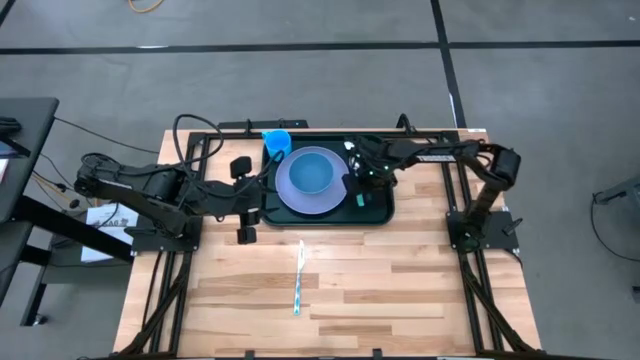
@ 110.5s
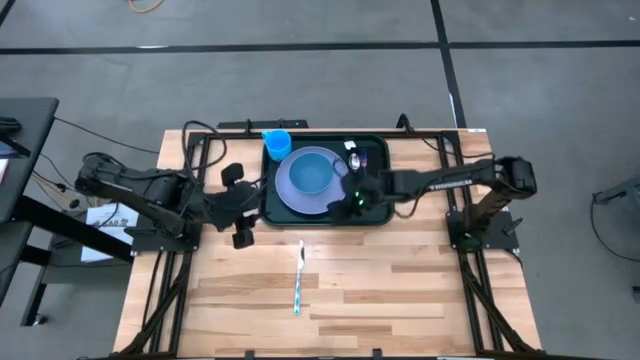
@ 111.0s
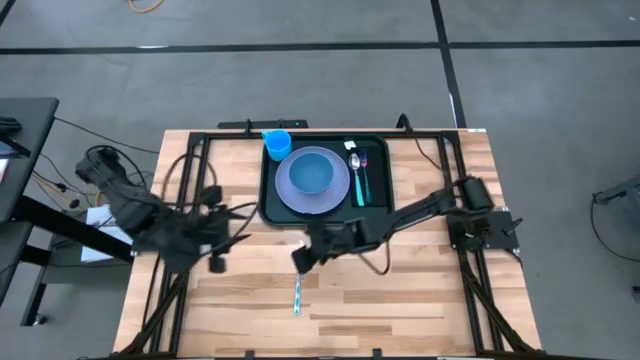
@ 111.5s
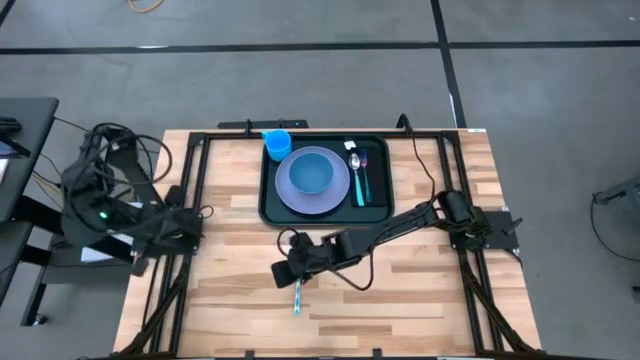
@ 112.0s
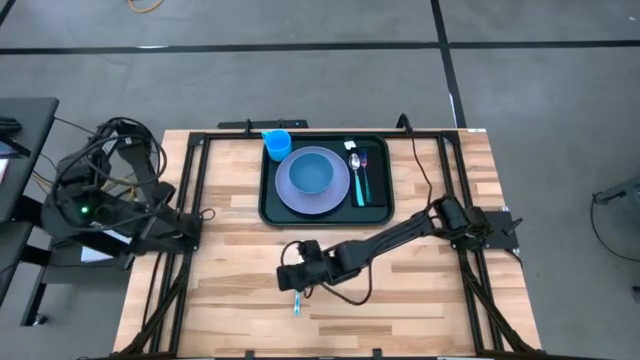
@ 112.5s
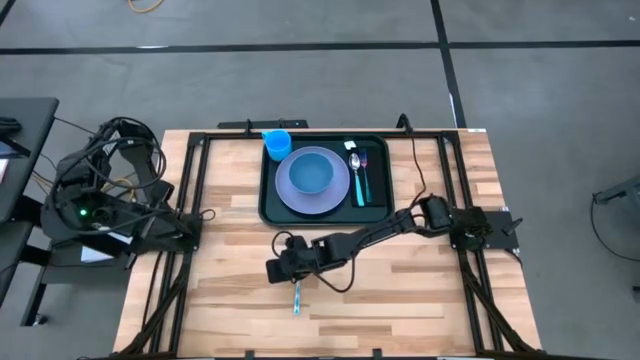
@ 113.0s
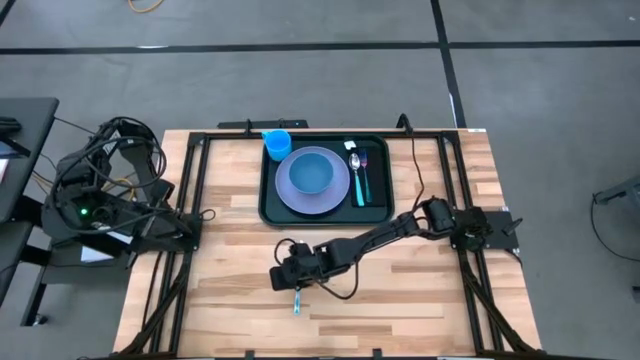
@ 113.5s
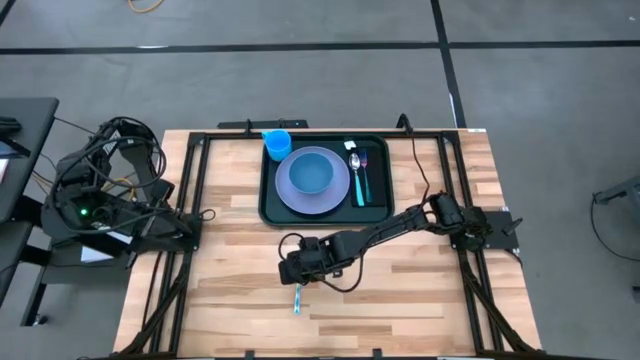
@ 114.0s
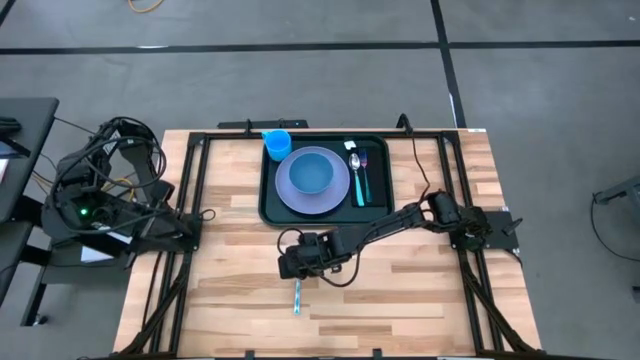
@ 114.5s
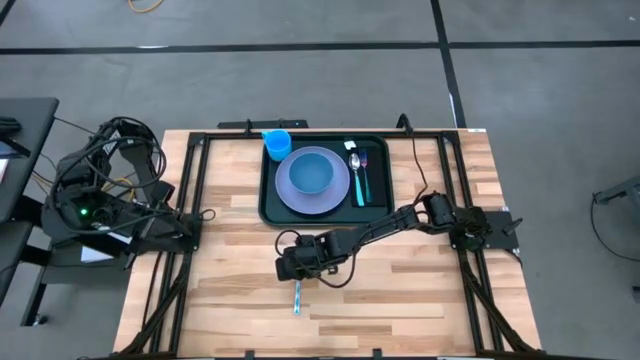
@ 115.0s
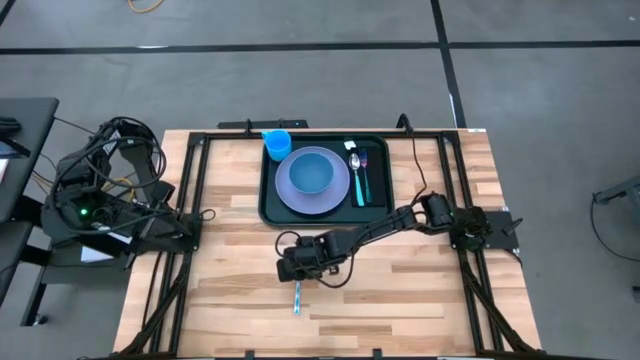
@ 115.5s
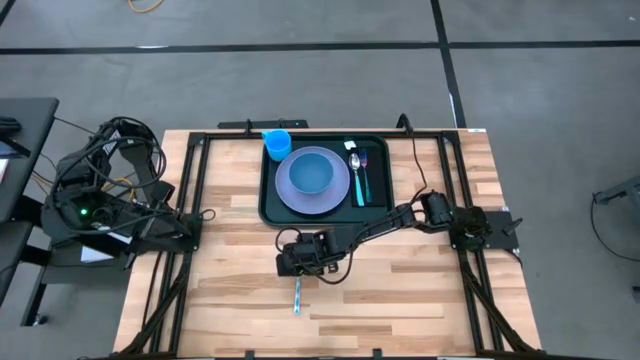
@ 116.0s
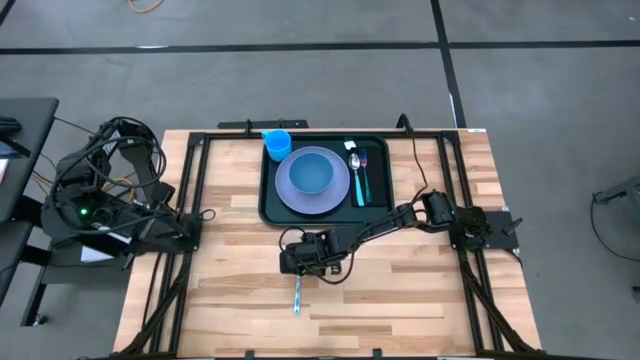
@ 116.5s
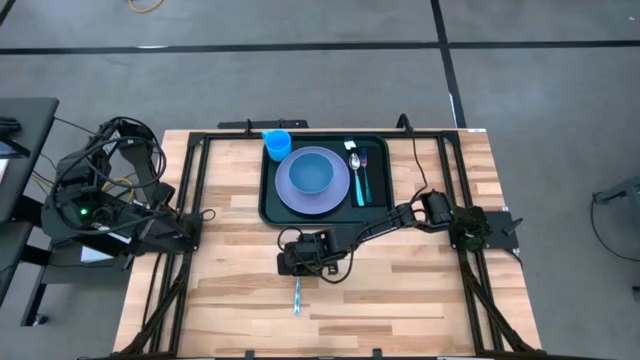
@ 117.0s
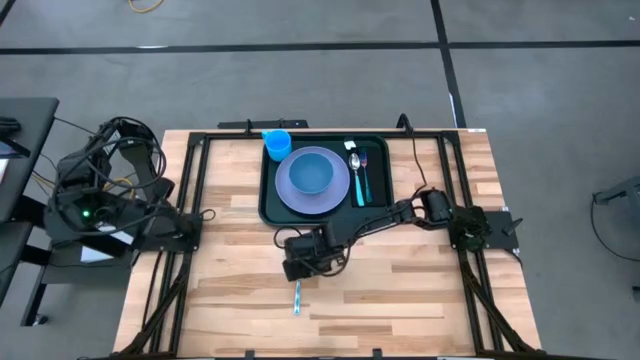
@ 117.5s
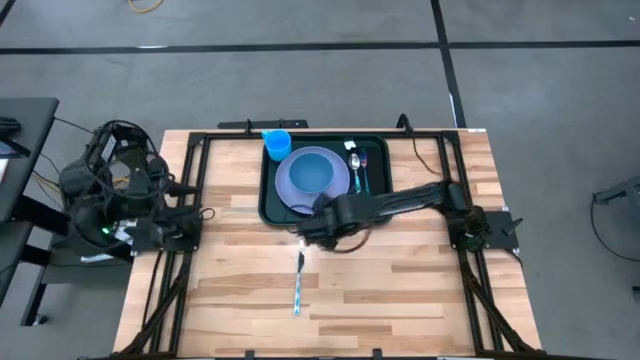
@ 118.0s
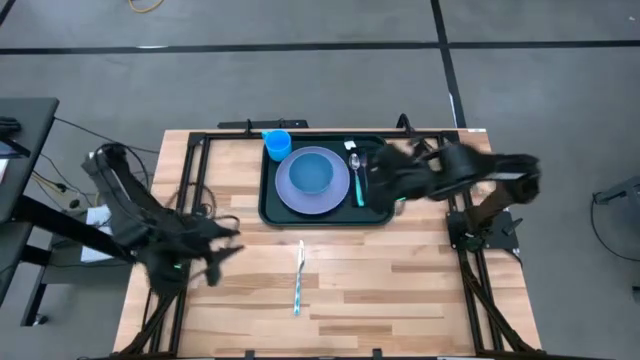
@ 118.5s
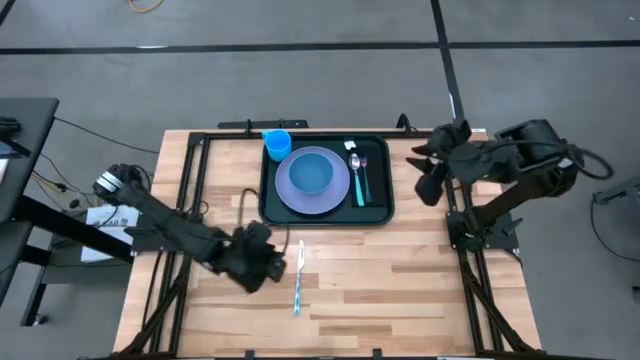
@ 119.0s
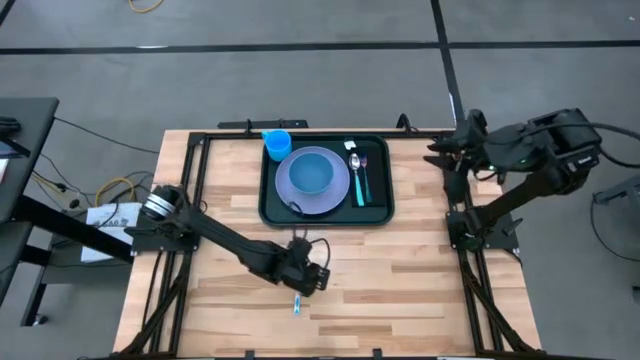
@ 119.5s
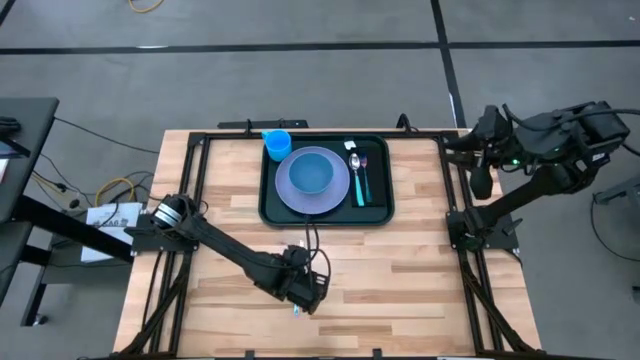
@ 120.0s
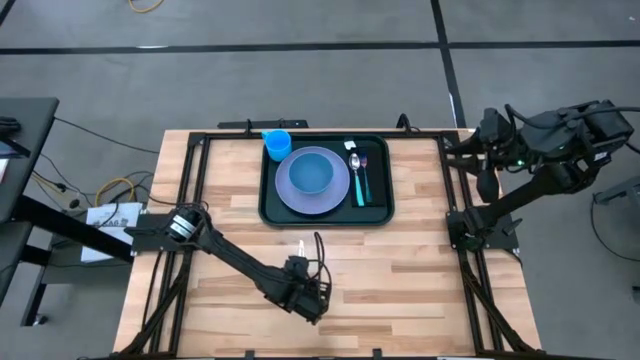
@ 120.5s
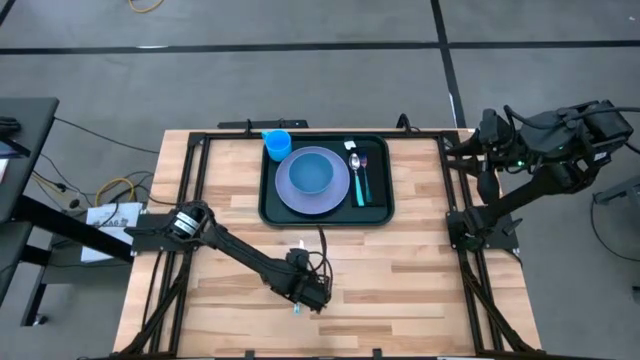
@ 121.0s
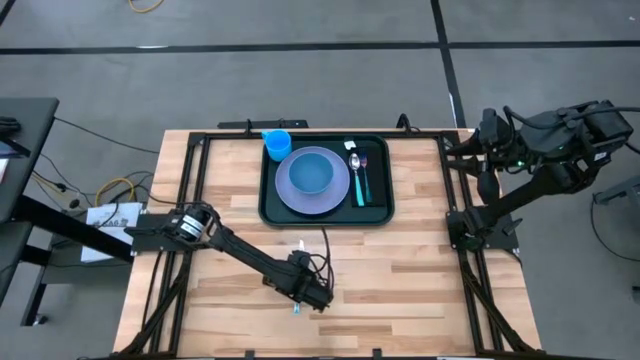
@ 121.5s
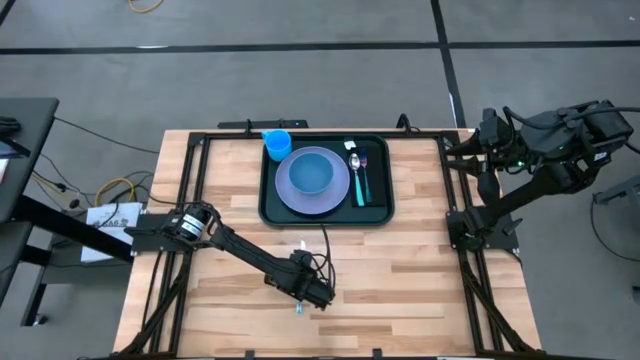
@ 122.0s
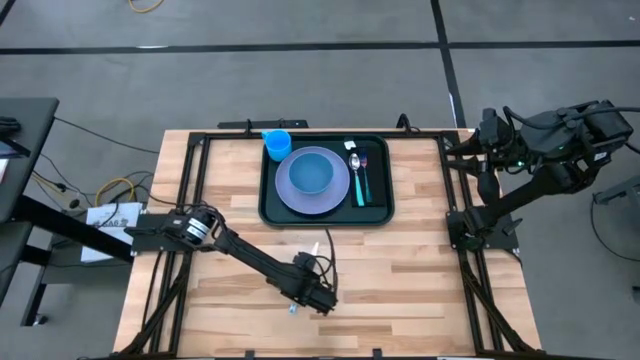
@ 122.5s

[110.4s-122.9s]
Task: Set up tray
Put the knife on top of the table napkin to the right of the fork on the tray

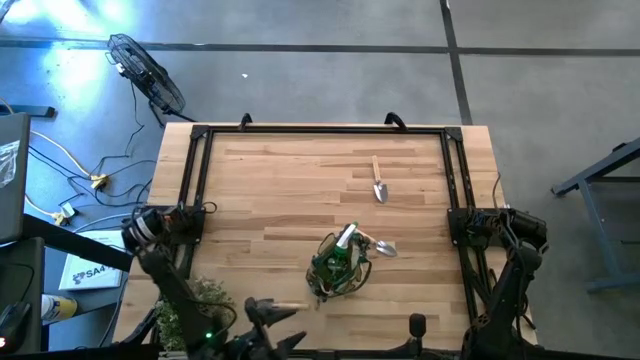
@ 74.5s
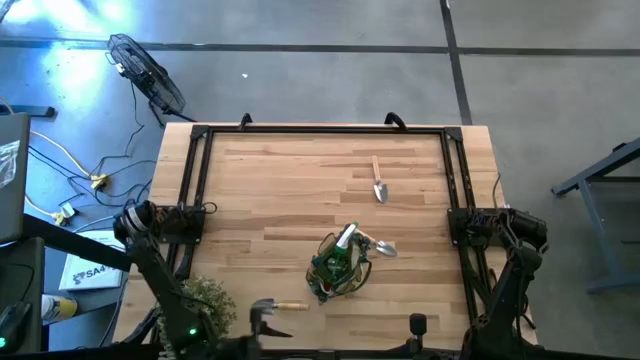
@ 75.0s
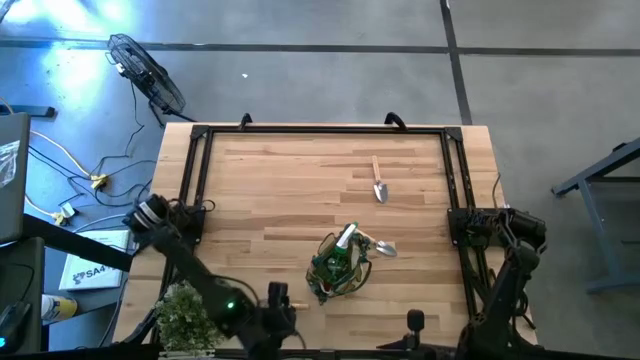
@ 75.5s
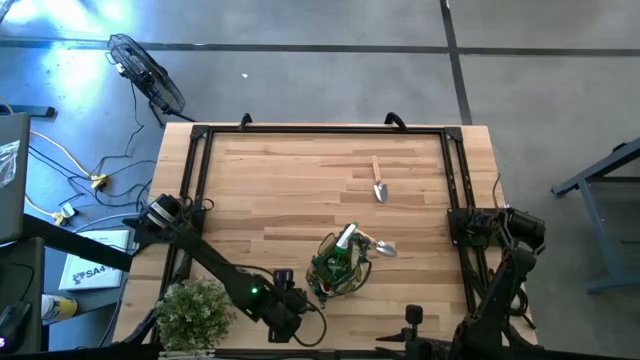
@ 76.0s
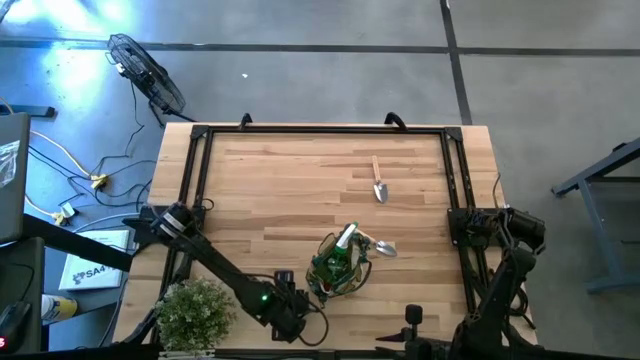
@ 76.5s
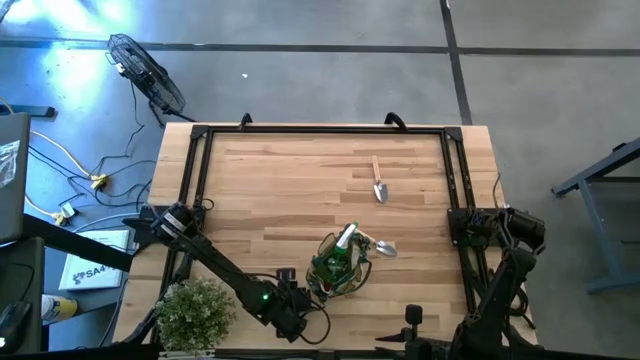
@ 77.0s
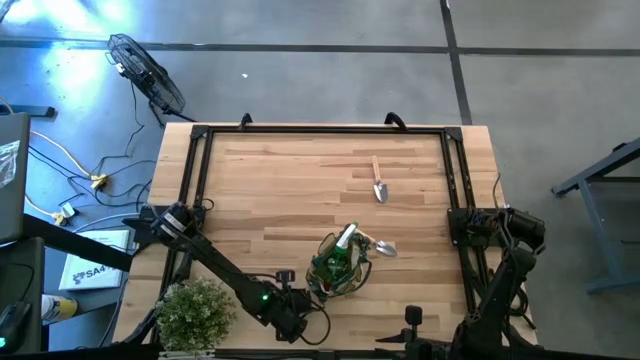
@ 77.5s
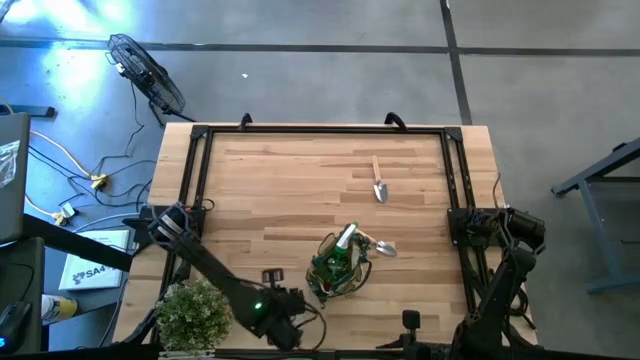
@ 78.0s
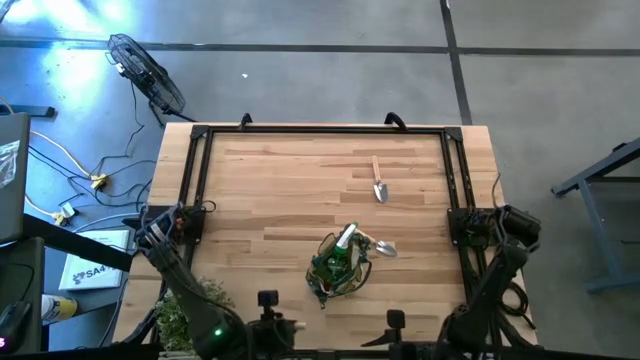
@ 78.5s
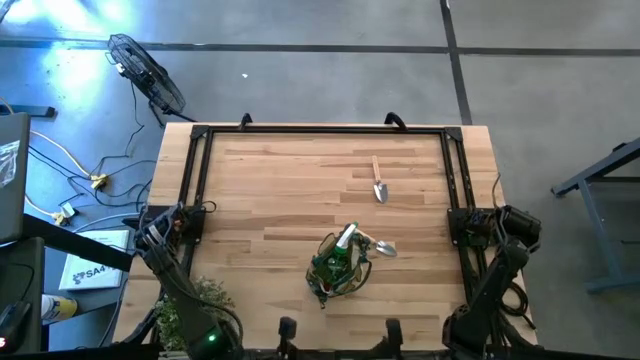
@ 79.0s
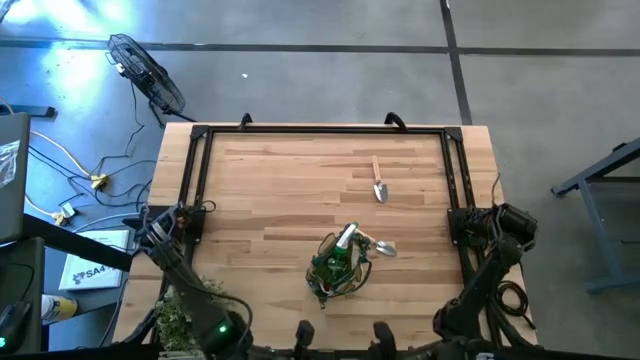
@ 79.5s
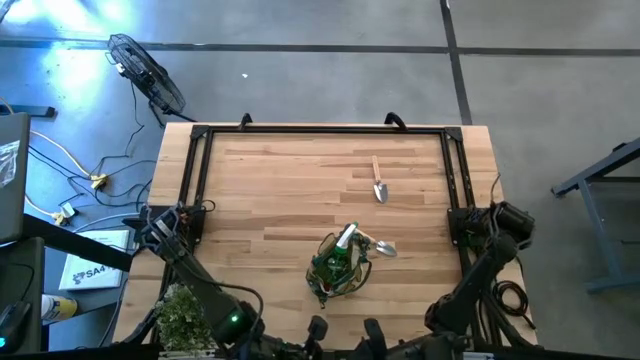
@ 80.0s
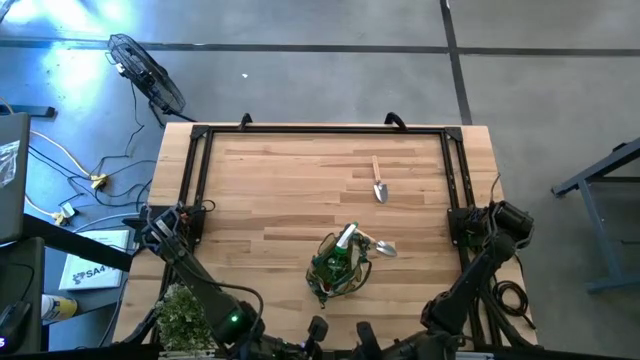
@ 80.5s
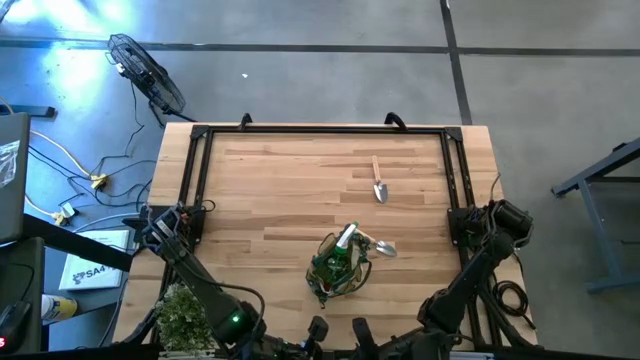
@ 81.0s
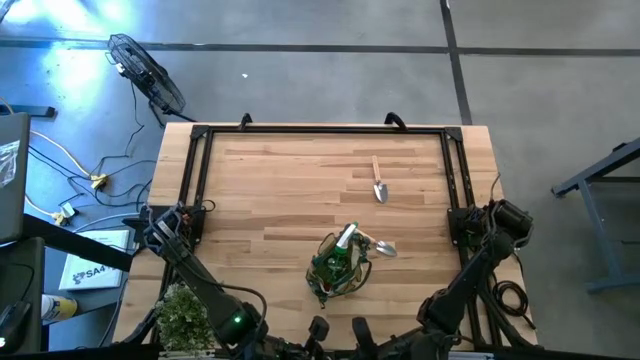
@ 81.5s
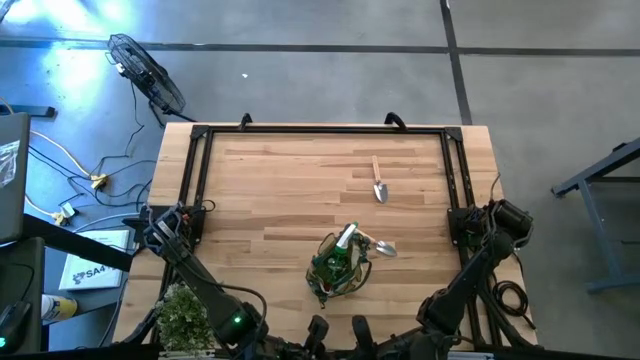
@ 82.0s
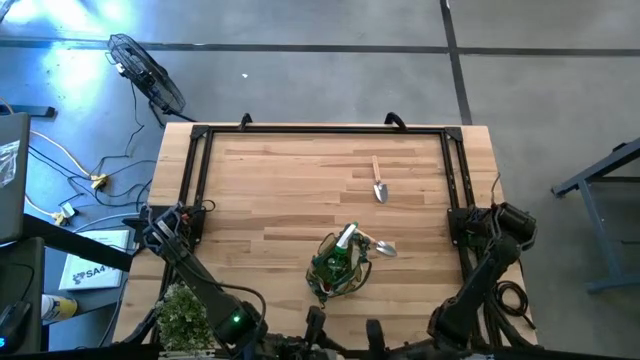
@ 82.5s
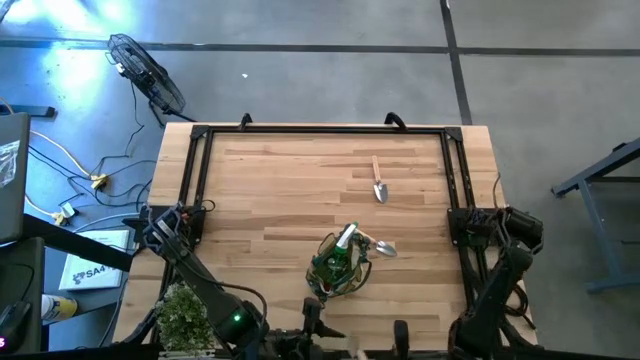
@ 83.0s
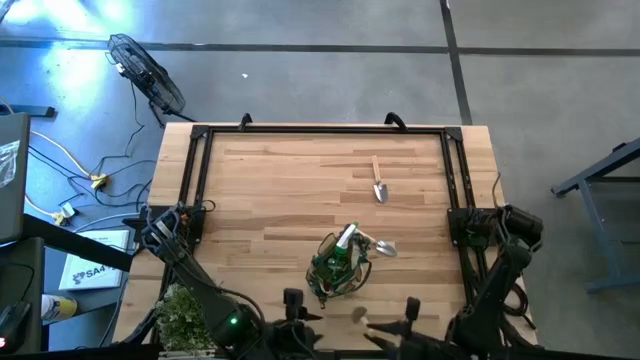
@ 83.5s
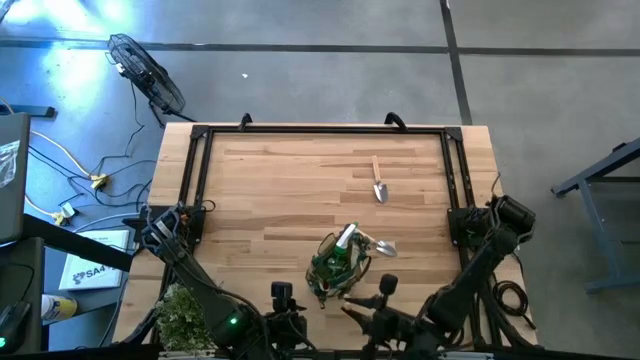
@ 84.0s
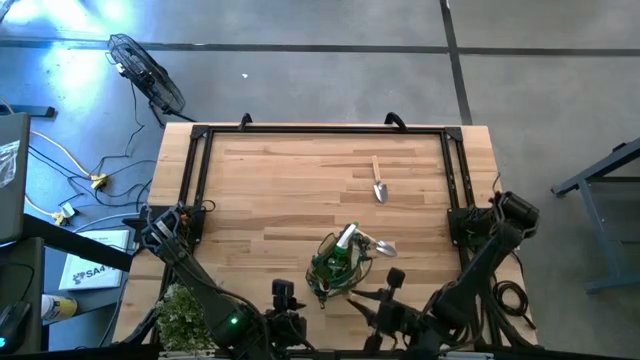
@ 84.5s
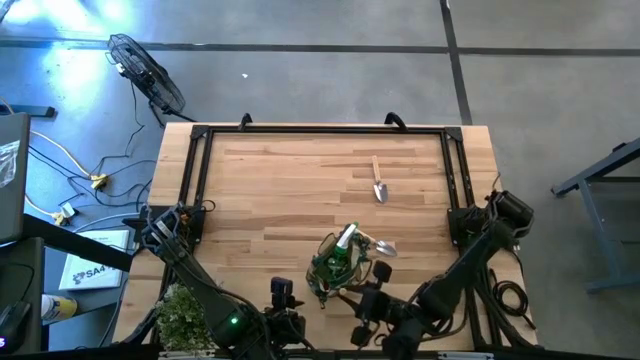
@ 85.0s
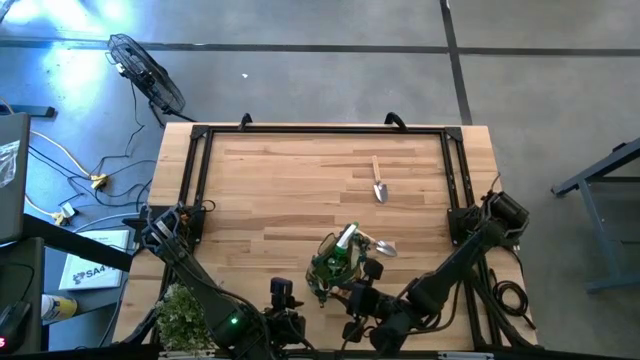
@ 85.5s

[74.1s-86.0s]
Task: Pick & Place Garden tools in Gardening bag
Put the bottom trowel into the gardening bag
